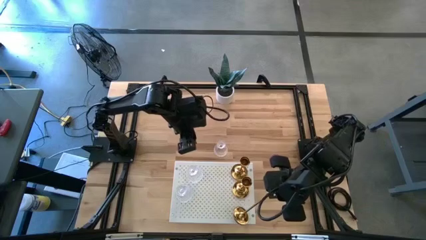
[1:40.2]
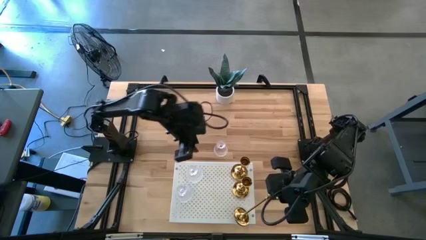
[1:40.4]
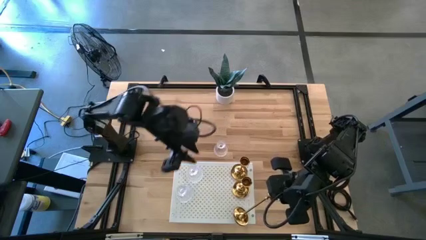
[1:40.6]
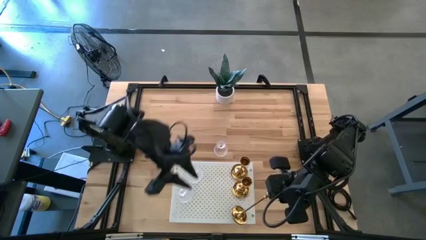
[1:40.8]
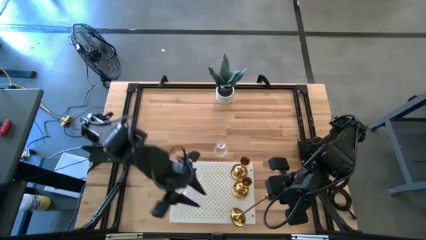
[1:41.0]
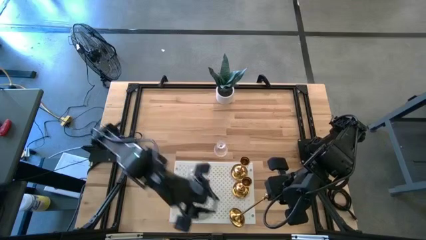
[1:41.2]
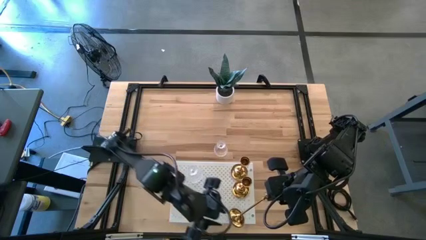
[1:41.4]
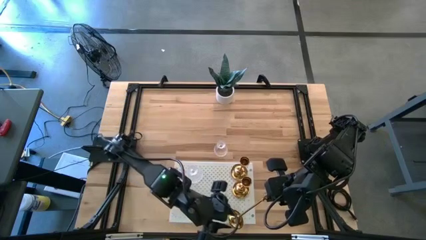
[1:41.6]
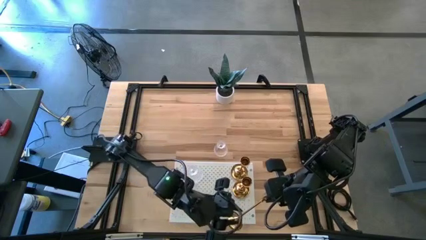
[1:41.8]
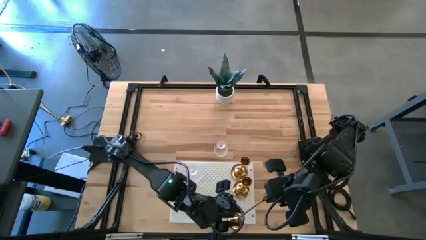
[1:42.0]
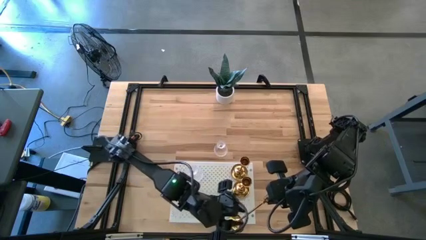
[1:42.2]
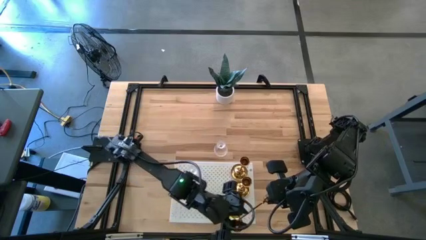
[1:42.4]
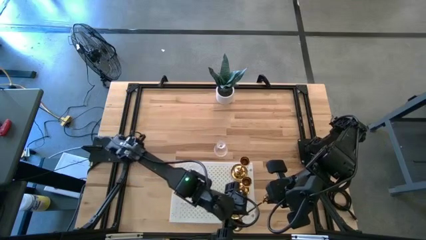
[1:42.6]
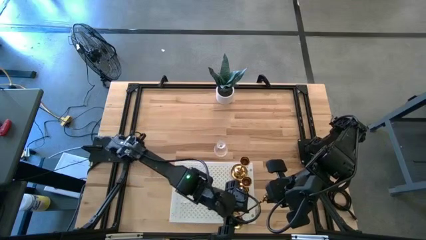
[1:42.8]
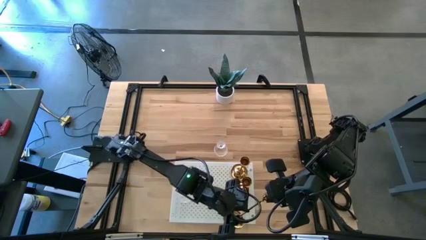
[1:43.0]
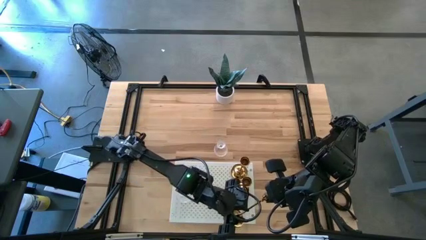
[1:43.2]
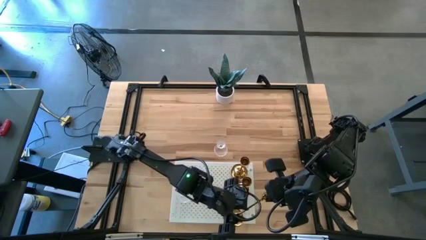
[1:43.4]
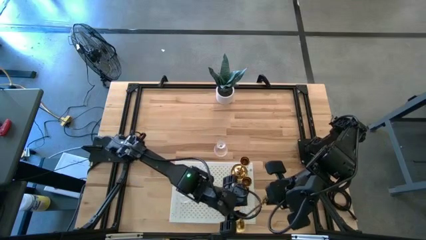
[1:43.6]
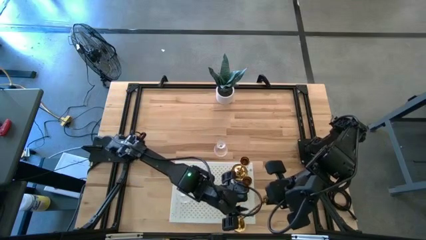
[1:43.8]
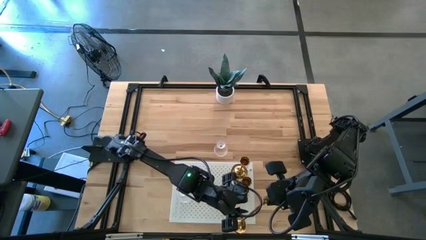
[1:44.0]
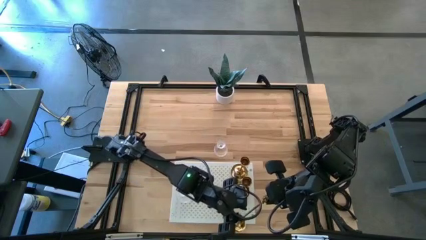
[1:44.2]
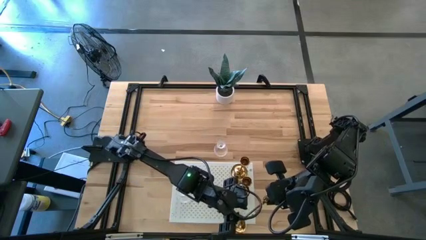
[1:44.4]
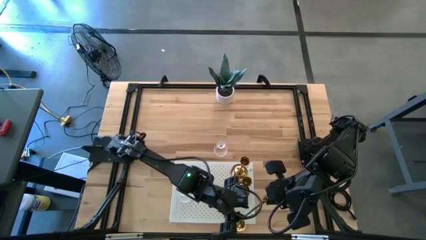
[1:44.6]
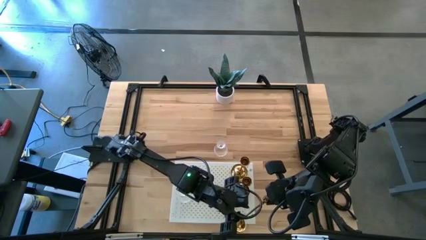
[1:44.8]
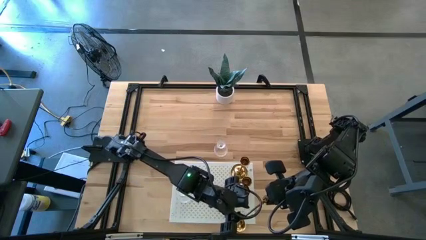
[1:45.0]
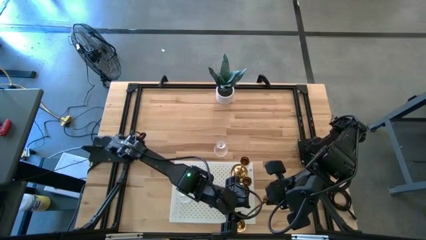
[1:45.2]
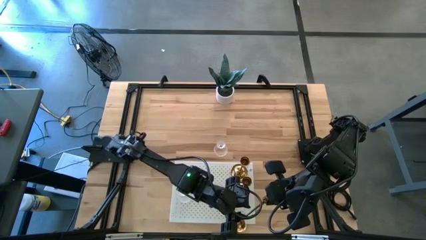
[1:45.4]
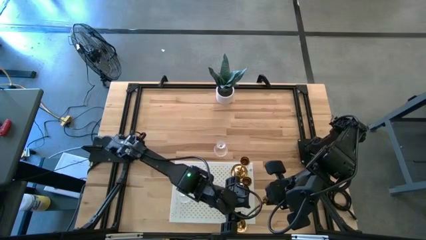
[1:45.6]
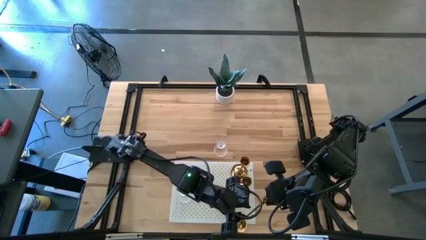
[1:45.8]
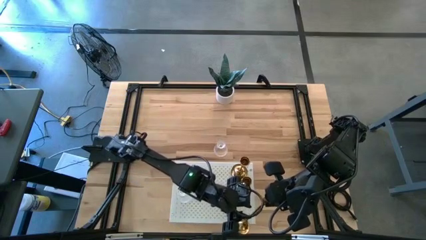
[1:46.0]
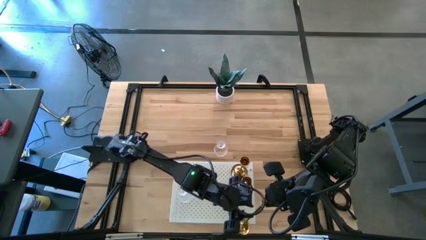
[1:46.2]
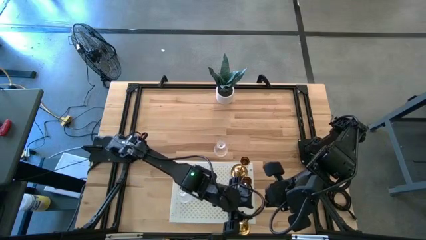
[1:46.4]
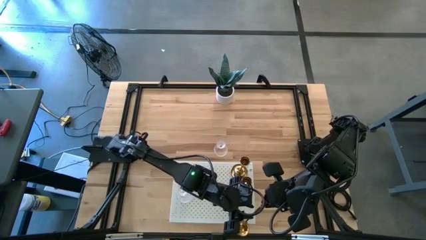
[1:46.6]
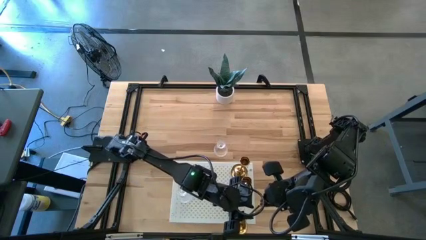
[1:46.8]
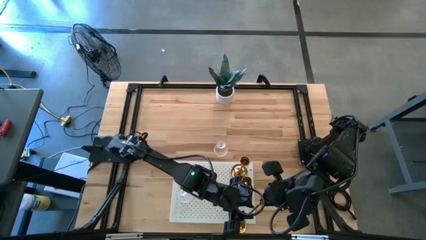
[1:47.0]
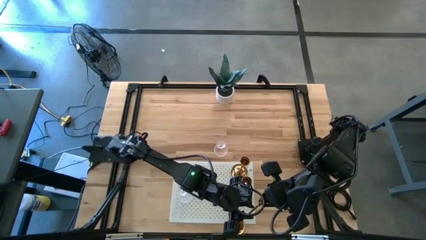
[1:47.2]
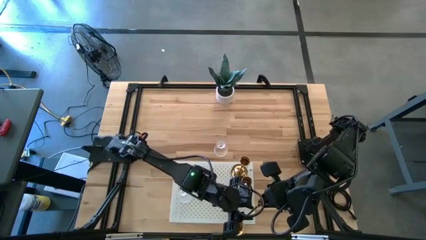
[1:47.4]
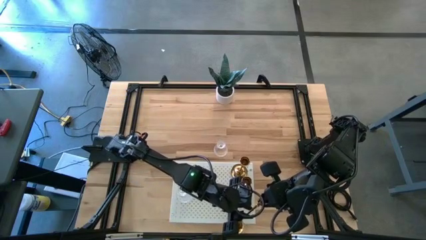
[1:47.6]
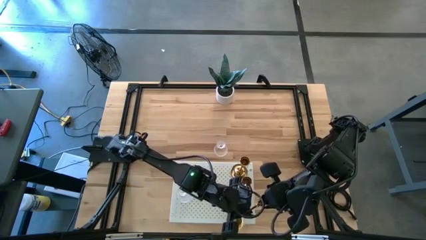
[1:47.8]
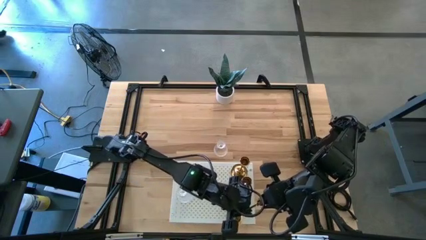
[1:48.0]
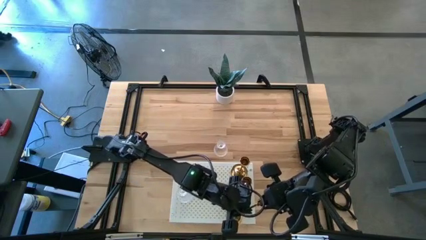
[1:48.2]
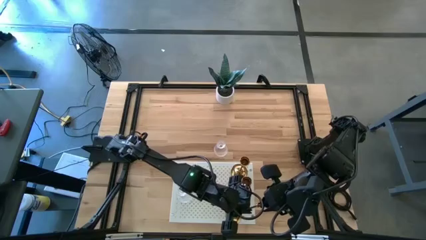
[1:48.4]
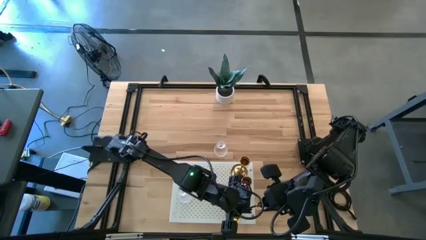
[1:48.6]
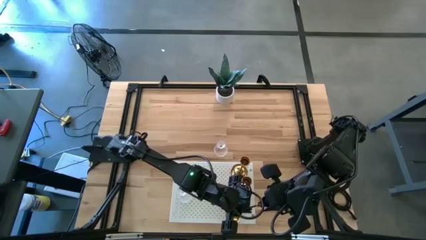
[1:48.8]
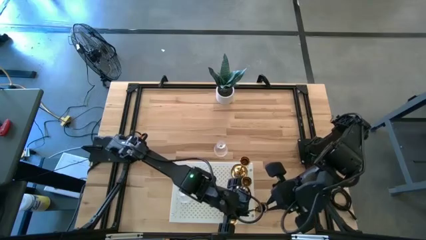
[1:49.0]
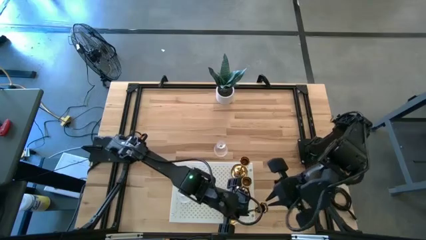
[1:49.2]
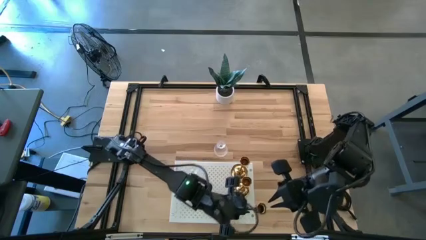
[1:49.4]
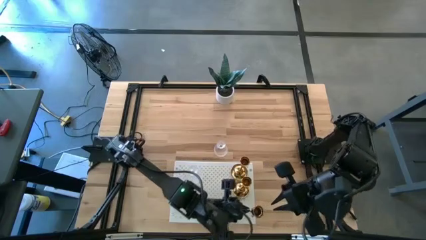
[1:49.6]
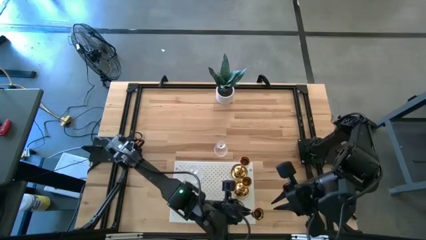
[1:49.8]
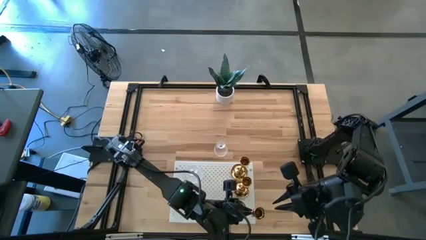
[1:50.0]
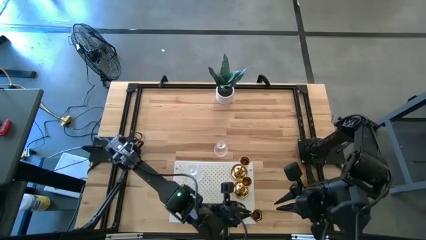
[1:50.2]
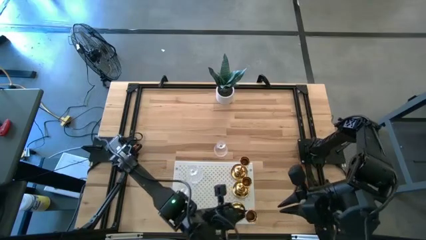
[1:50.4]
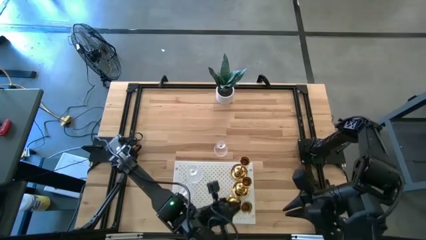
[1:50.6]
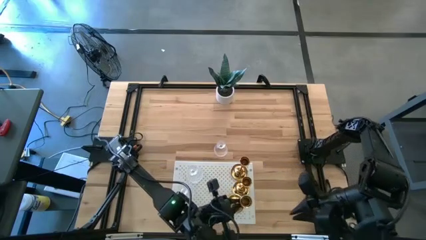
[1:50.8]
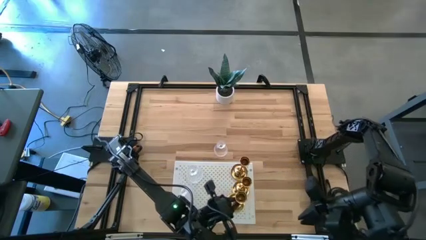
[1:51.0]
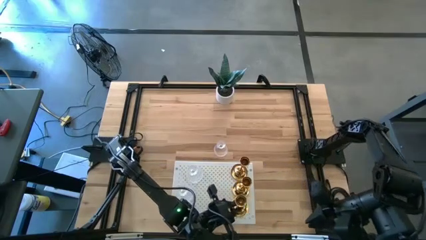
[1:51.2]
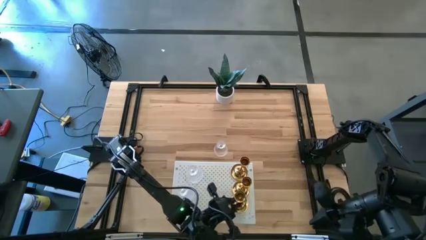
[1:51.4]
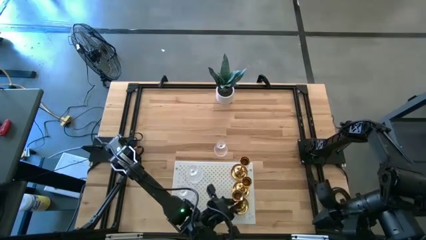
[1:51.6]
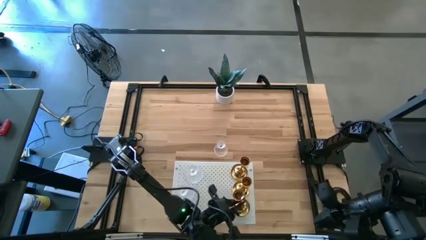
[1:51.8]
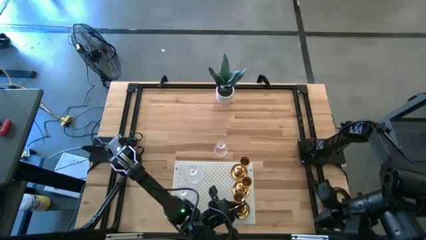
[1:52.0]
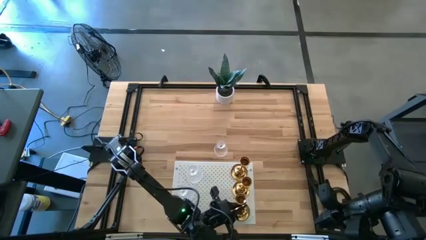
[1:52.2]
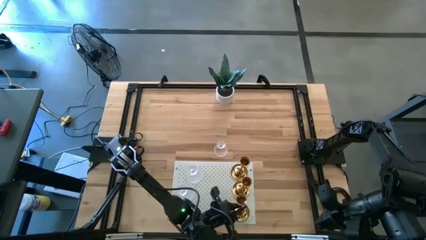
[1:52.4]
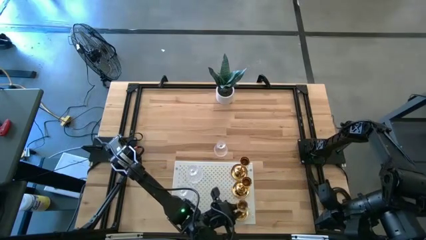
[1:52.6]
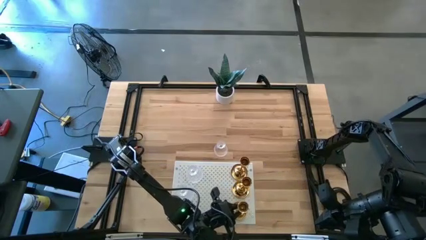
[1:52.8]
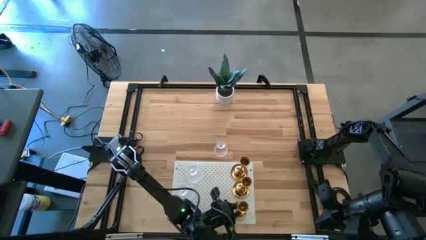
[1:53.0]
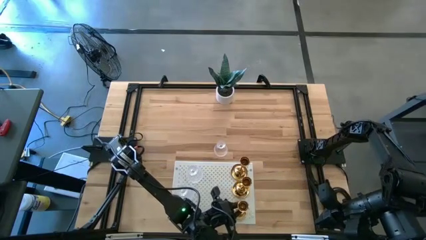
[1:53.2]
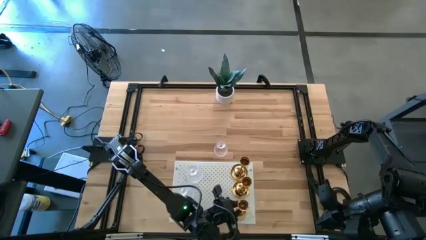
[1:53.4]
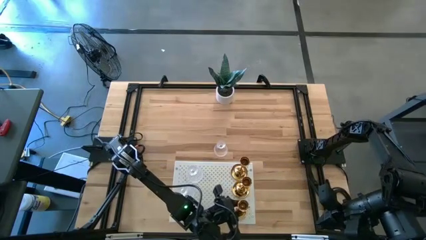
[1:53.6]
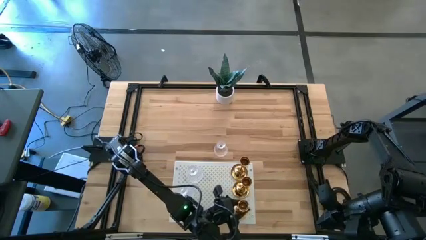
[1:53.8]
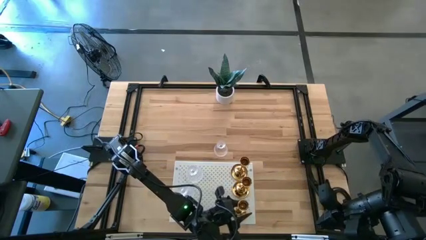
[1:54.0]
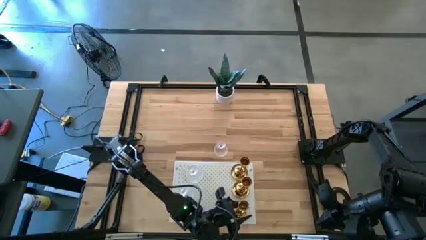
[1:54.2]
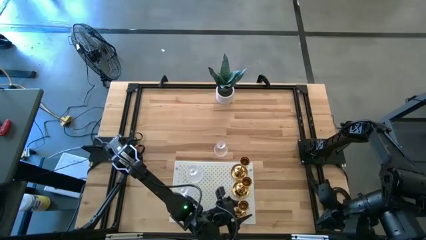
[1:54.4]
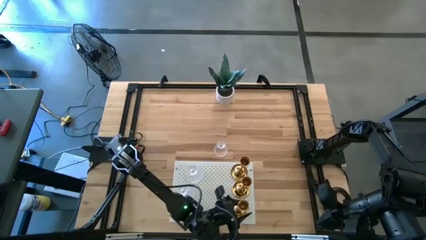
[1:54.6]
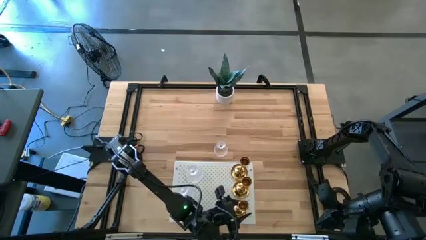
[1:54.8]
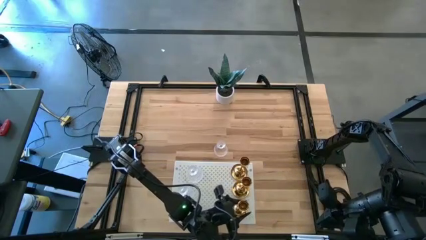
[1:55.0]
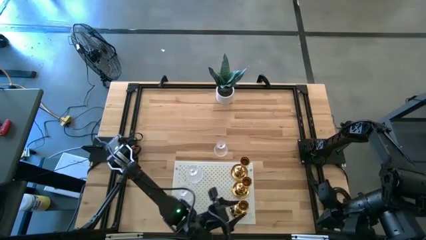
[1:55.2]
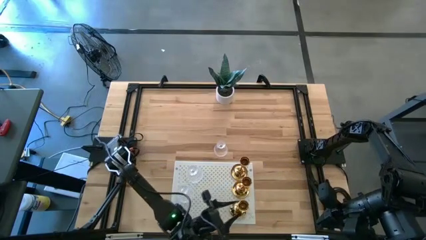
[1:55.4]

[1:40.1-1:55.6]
Task: Pick & Place candle stick holders
Put the candle holder on the shelf

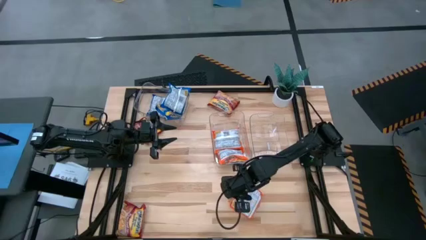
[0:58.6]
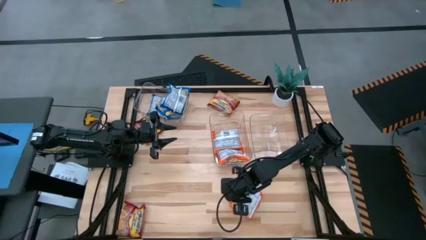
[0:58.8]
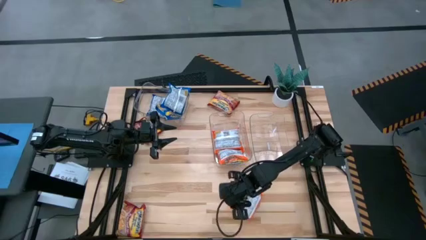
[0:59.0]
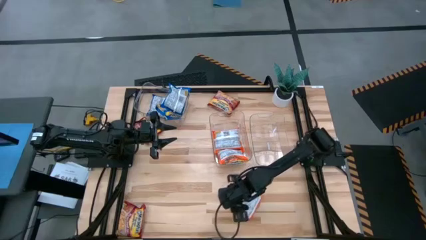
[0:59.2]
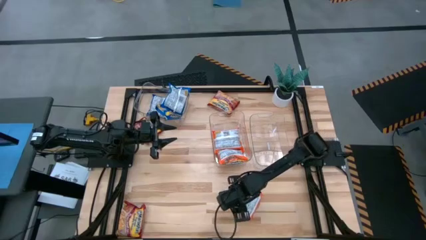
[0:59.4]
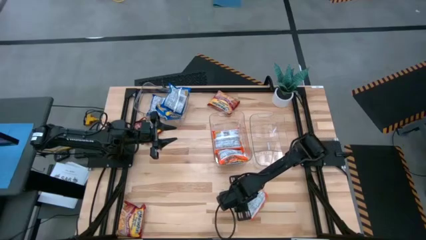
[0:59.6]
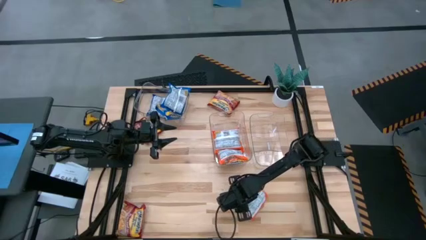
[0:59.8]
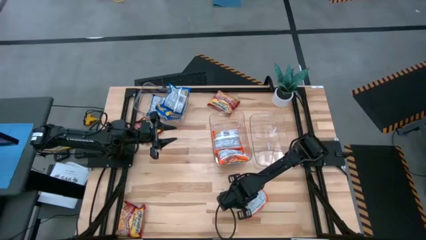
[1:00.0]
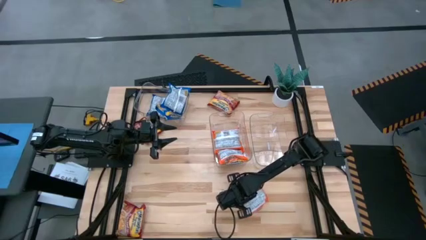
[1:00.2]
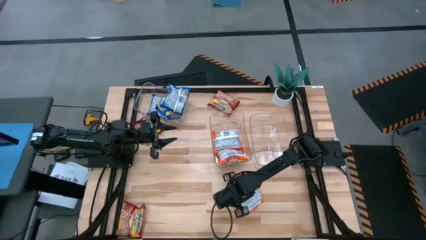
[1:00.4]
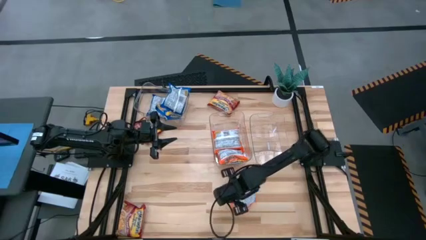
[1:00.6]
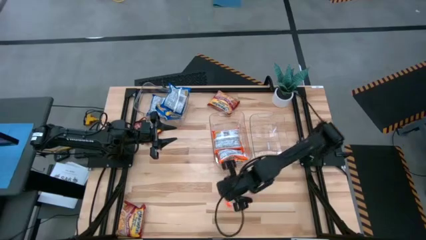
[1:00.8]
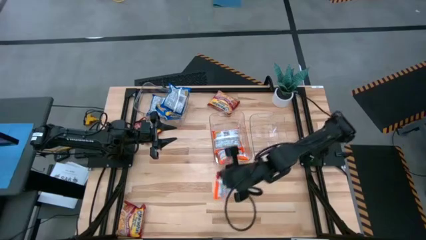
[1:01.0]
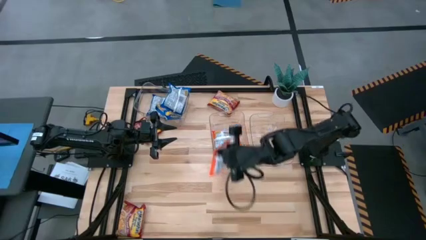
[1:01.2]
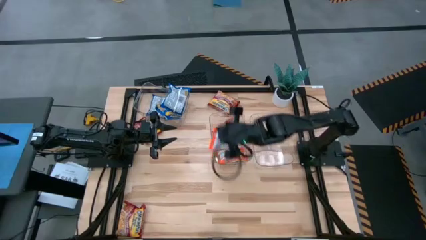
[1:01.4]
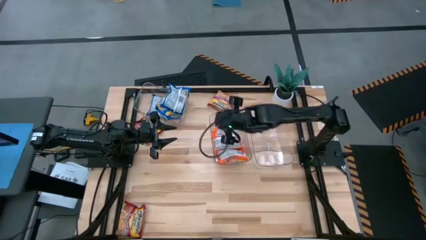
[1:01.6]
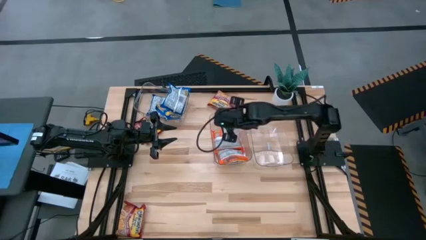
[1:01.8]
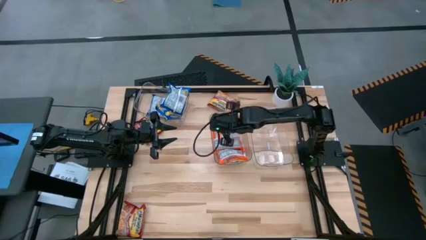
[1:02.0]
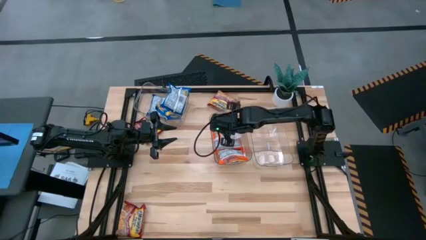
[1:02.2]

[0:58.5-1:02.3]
Task: Sort Maruchan noodles
Put the orange noodle pack into the bottom center transparent bin
